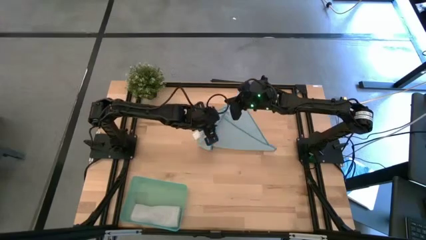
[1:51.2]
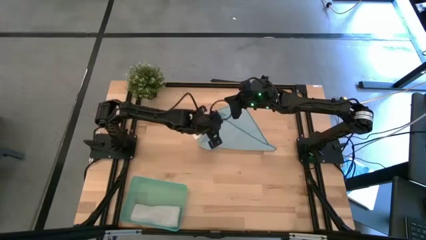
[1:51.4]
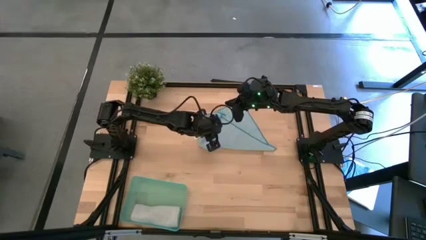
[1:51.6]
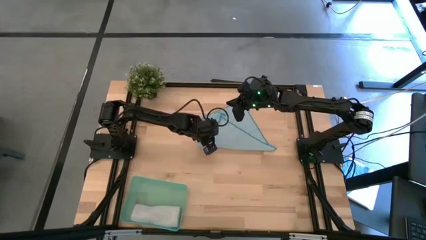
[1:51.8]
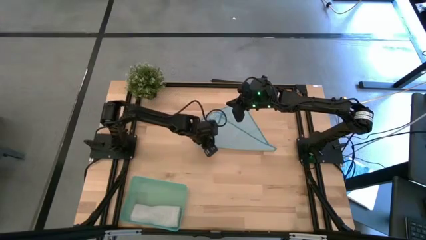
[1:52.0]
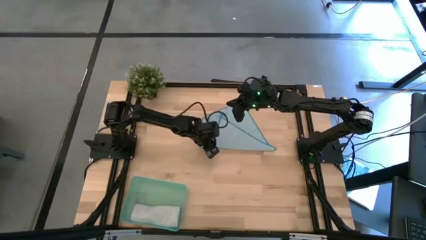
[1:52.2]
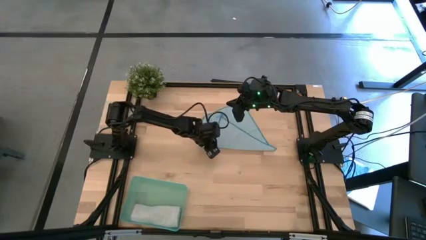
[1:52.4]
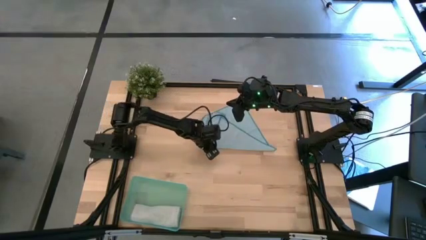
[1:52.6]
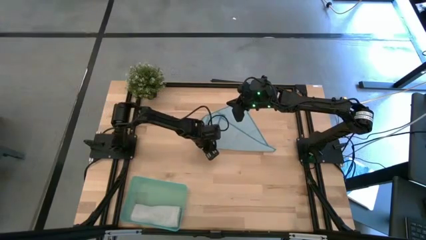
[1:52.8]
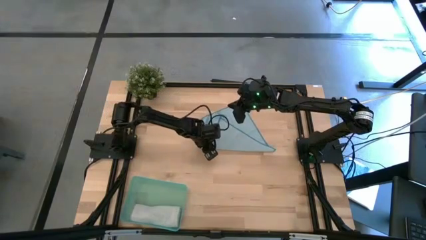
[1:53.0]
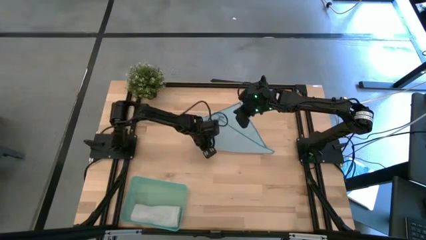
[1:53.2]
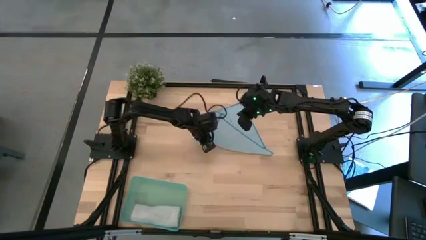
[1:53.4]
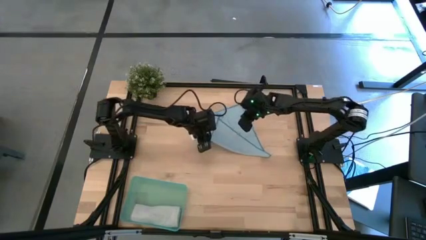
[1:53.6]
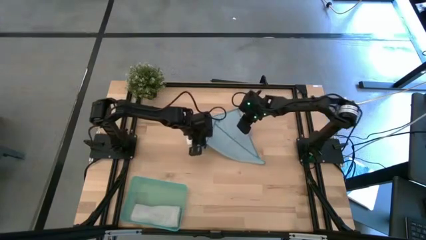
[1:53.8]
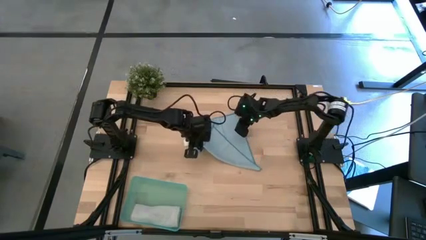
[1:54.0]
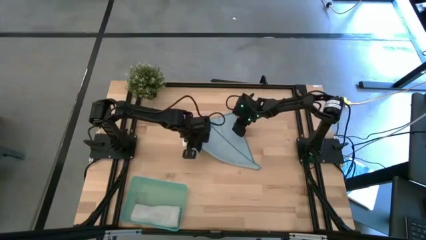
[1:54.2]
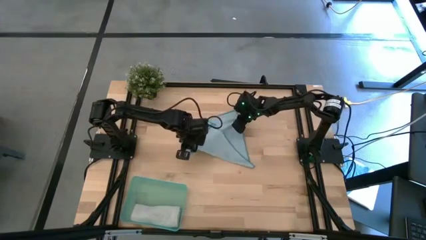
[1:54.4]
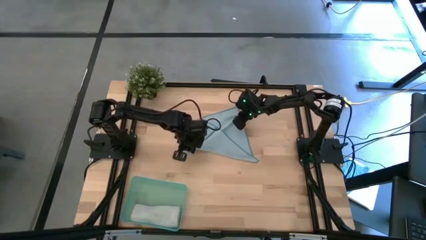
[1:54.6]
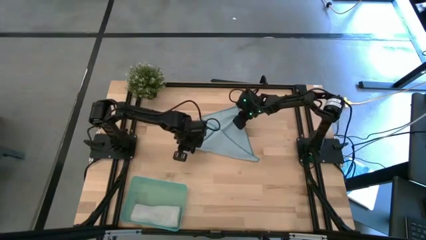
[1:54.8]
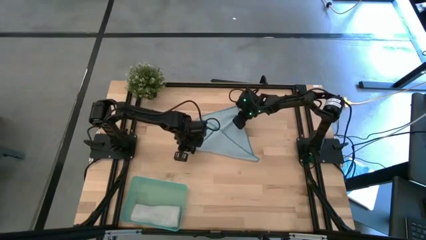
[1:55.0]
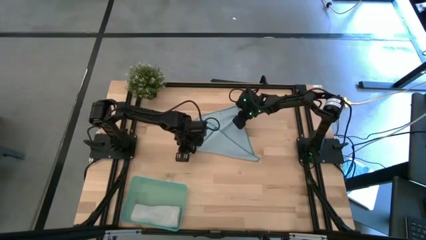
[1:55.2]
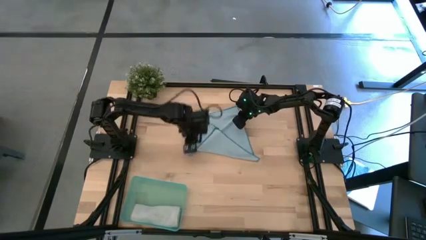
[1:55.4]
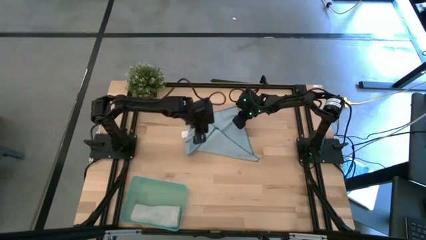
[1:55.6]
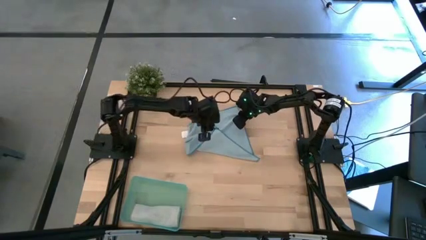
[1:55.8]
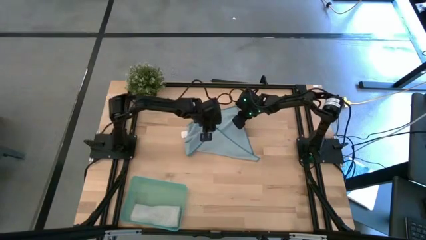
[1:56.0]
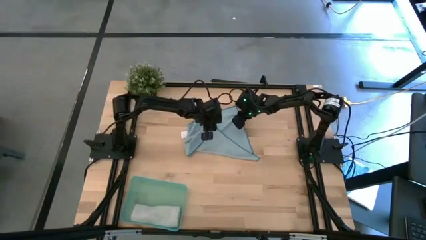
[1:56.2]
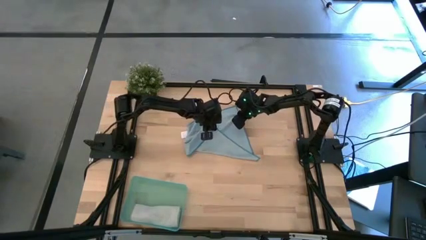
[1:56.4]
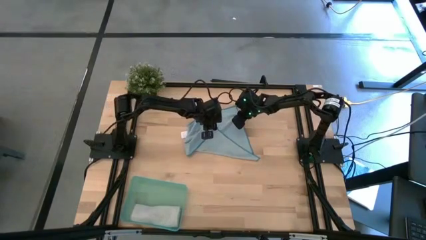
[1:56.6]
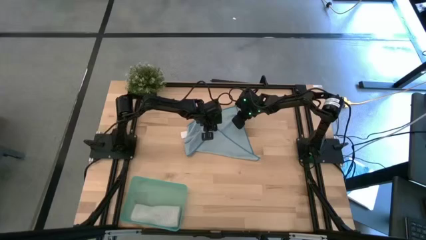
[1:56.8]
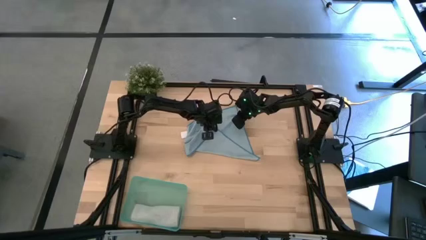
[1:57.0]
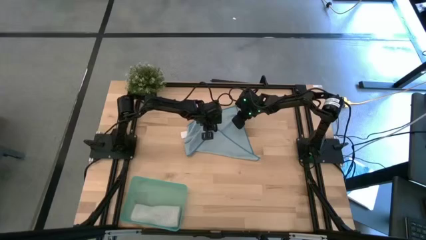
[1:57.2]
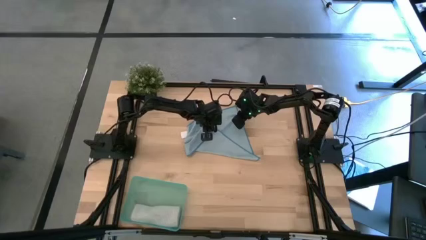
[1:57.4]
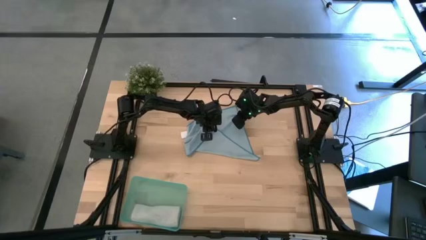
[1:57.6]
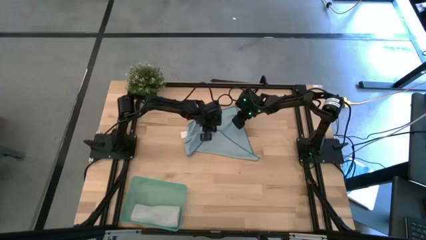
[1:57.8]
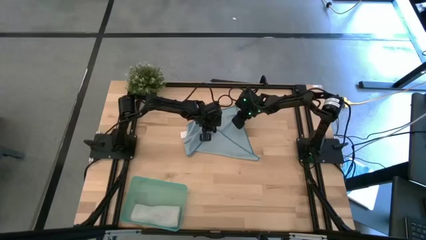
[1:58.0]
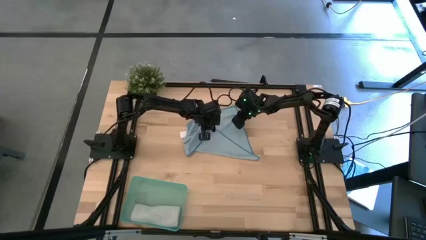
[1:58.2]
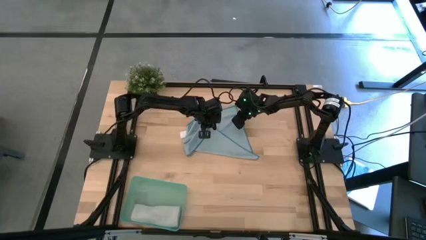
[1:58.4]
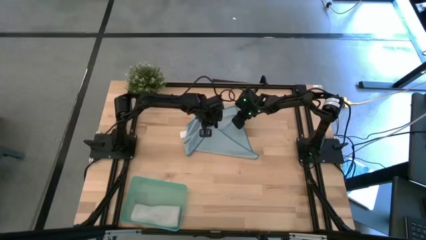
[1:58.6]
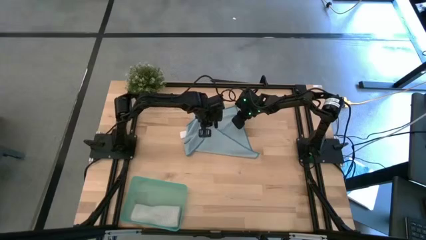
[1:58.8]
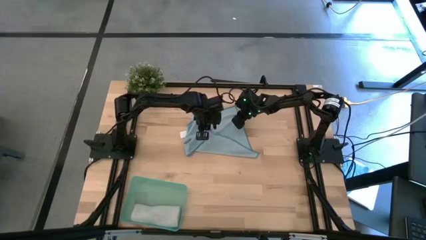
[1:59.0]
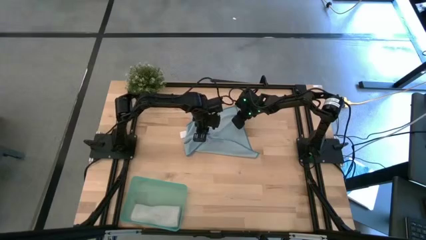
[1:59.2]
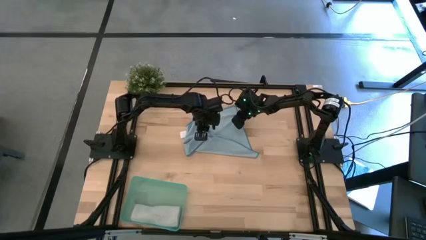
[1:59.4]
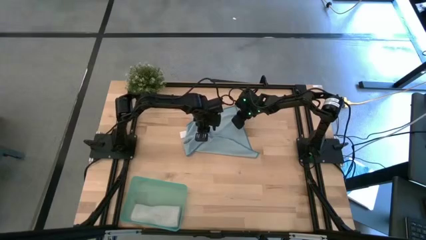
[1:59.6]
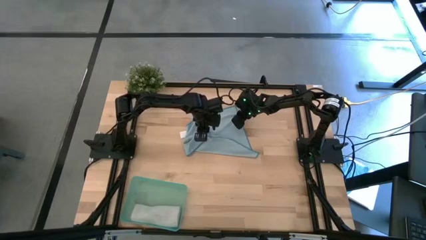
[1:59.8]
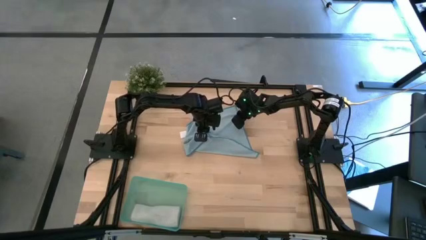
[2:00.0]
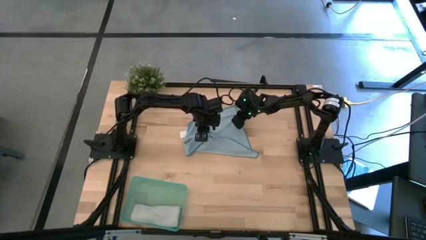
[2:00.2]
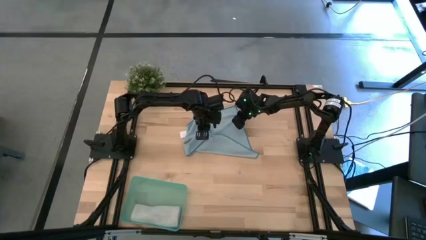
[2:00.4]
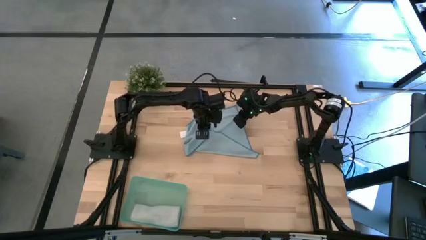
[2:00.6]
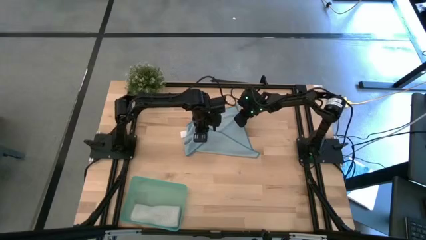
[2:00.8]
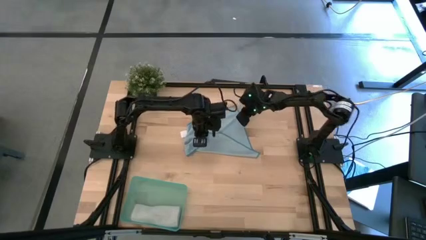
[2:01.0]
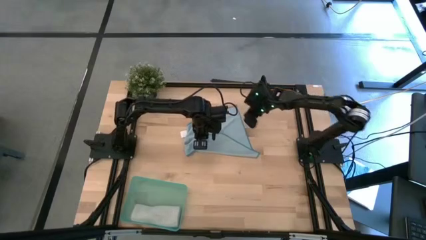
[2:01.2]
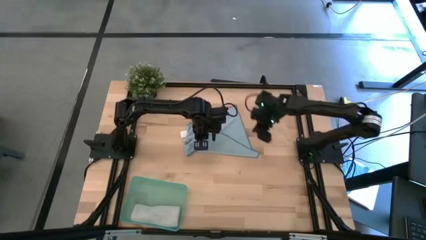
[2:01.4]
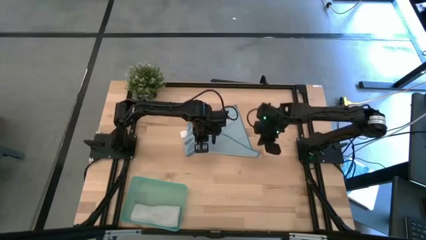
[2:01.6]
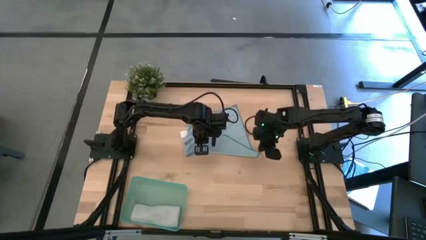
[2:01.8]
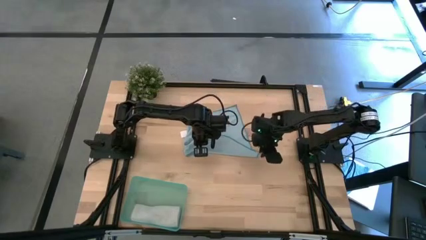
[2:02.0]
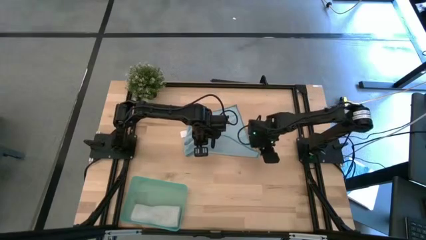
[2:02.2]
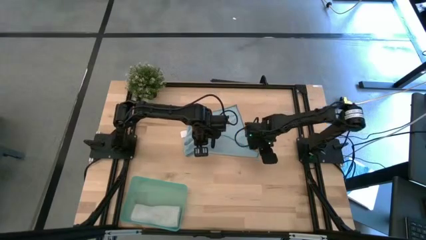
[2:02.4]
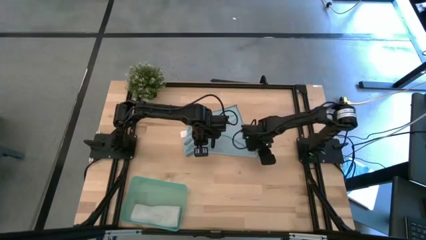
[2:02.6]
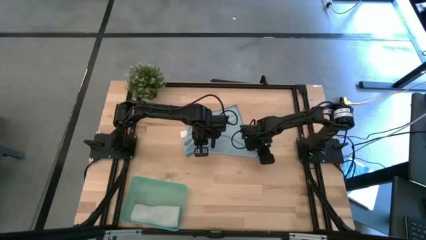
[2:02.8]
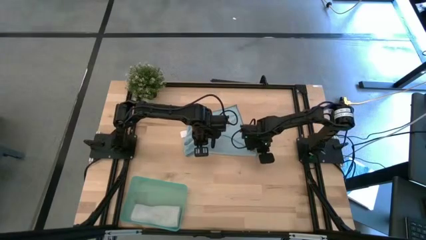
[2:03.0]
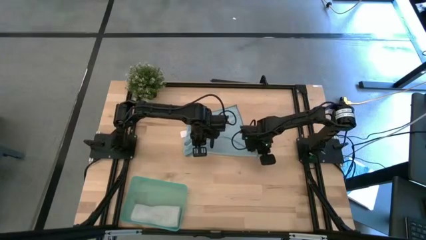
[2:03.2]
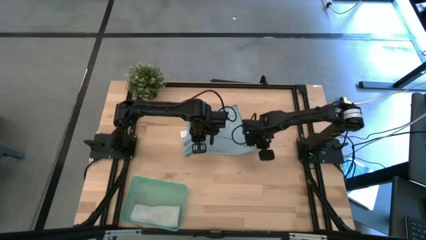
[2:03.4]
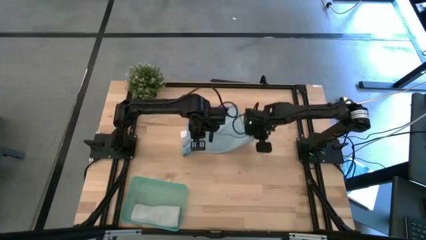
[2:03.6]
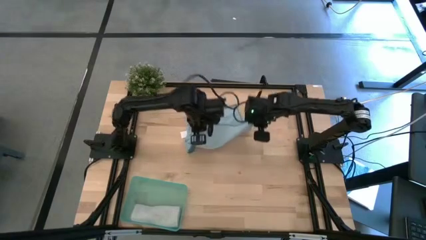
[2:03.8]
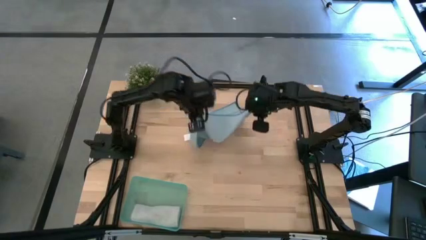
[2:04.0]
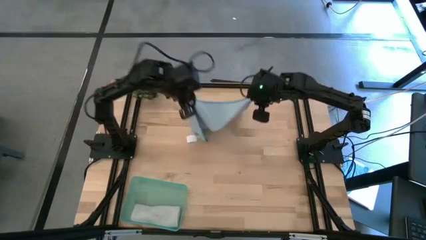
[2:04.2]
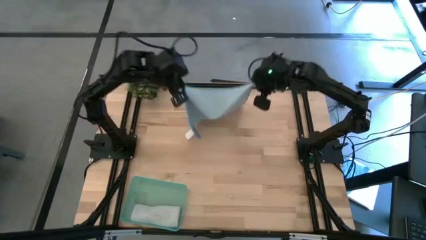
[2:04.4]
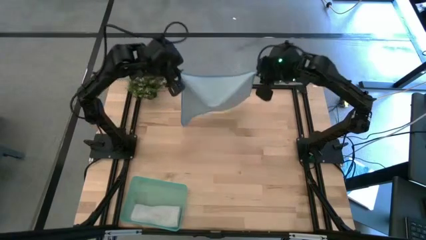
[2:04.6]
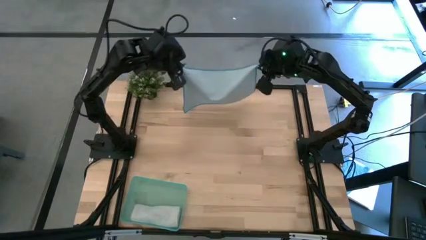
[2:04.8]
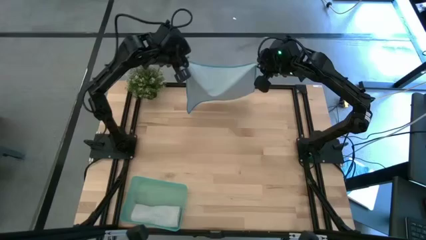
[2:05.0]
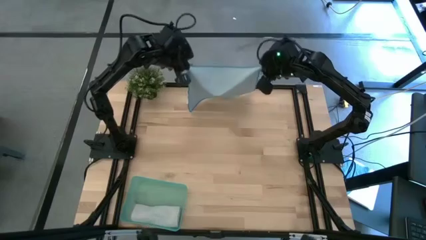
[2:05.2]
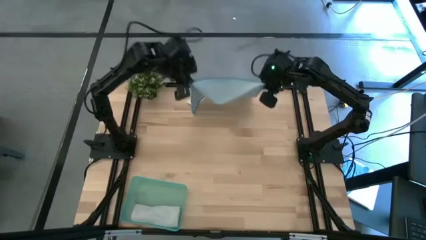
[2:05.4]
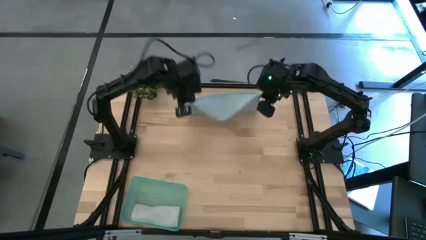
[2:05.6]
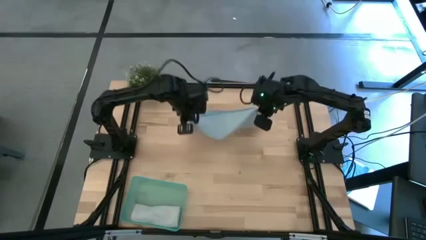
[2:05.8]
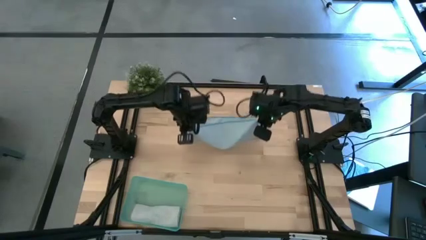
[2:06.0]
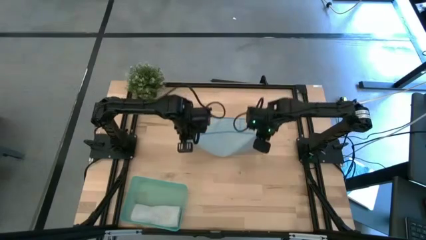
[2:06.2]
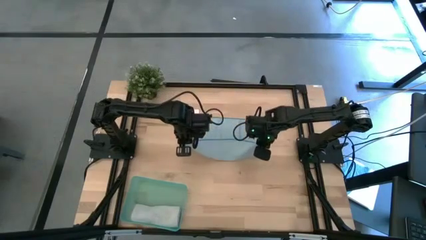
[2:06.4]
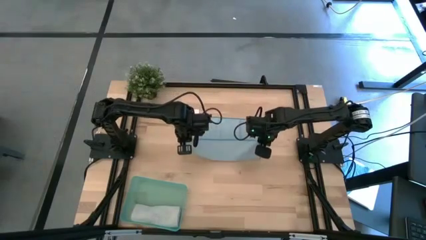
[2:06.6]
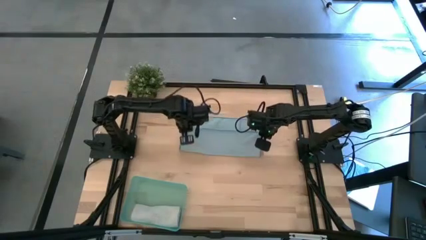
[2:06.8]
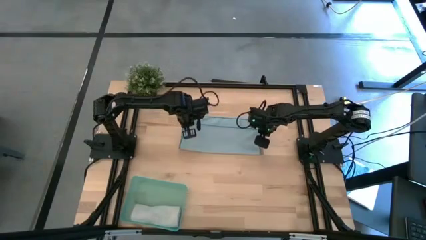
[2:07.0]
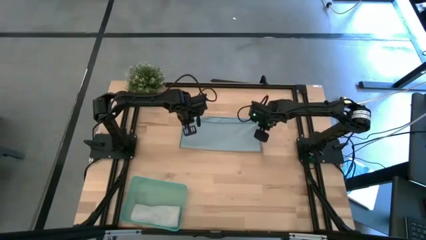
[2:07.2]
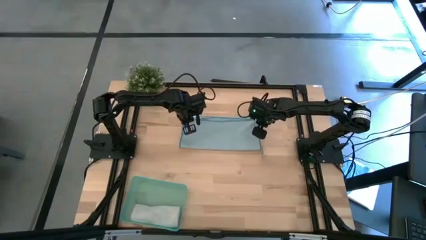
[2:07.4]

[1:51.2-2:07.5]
Task: Roll microfiber towels into tight, uniform cylinder then place into a basket
Roll the blue microfiber cloth
